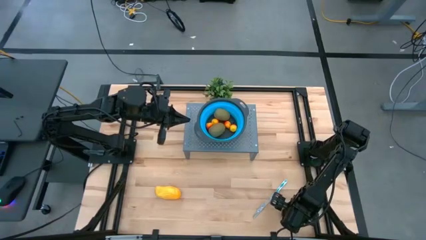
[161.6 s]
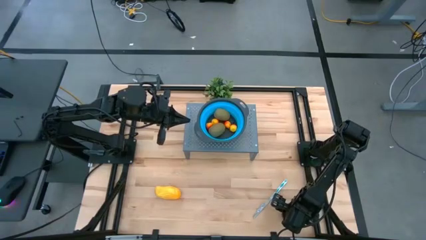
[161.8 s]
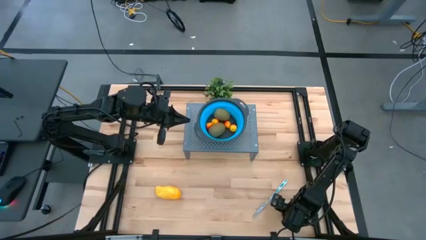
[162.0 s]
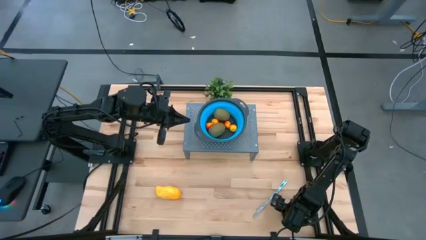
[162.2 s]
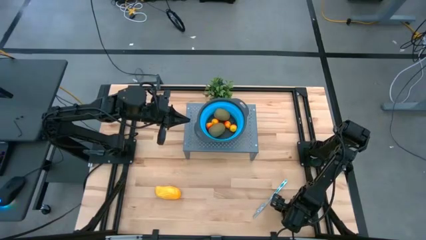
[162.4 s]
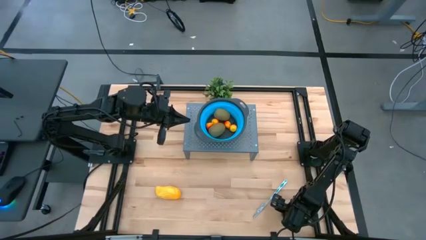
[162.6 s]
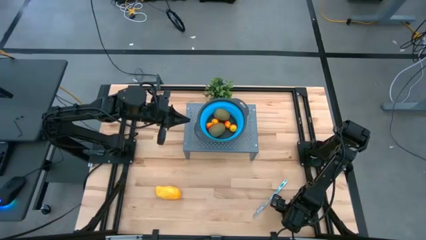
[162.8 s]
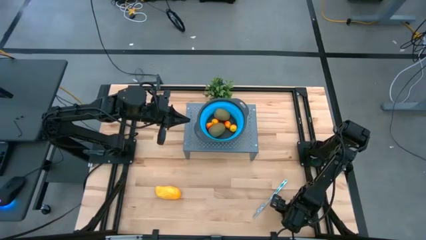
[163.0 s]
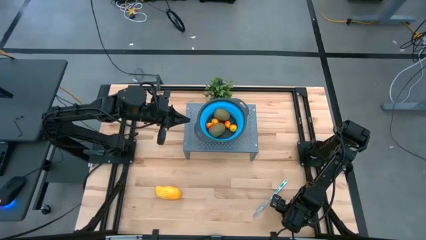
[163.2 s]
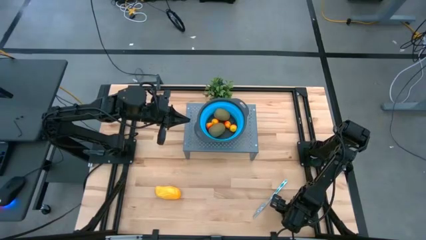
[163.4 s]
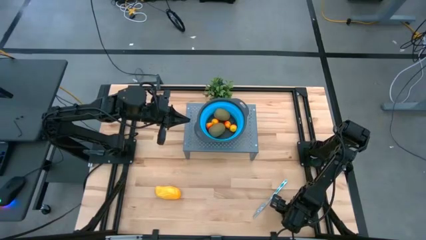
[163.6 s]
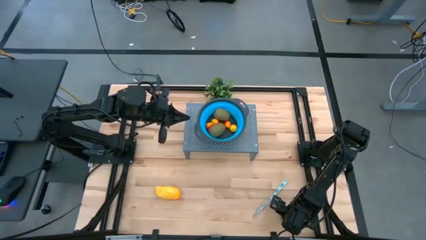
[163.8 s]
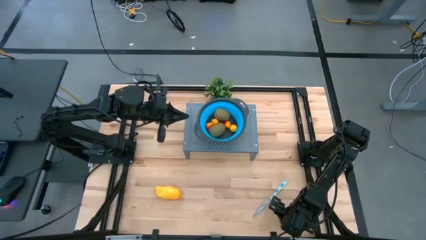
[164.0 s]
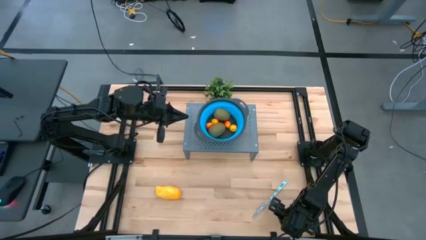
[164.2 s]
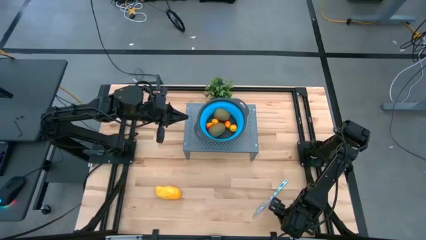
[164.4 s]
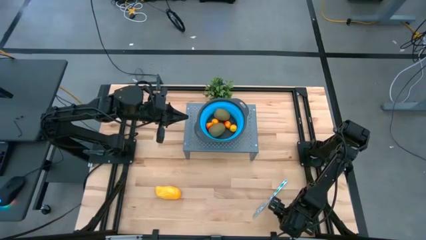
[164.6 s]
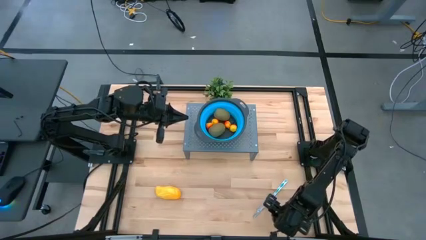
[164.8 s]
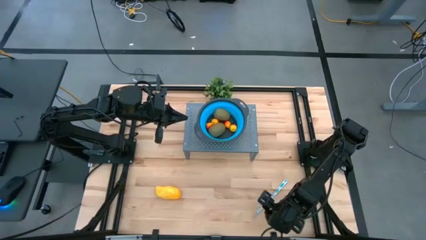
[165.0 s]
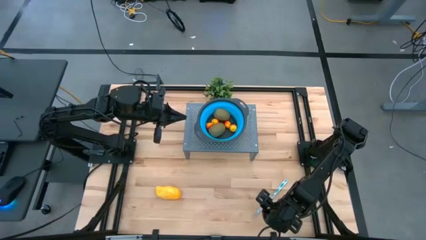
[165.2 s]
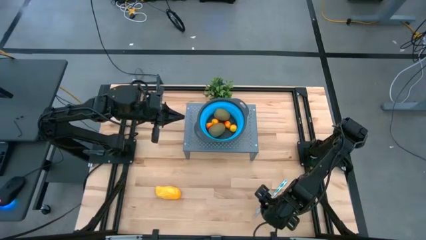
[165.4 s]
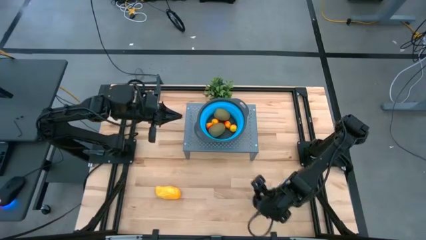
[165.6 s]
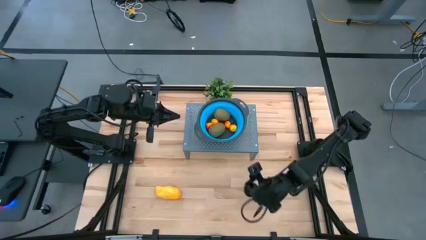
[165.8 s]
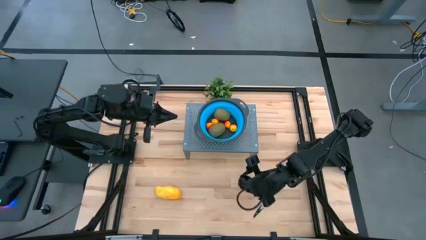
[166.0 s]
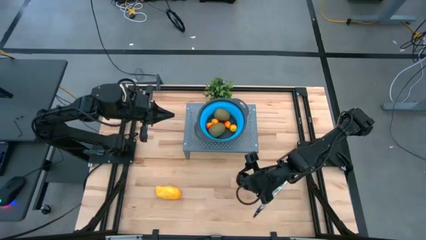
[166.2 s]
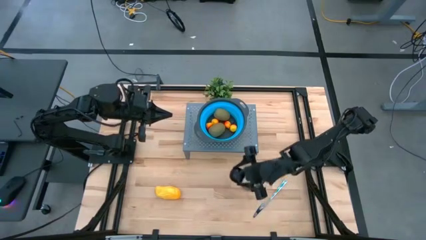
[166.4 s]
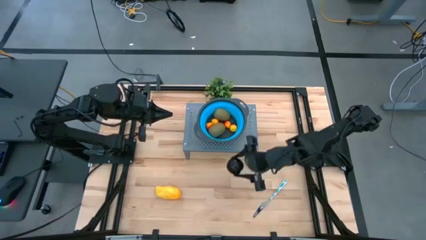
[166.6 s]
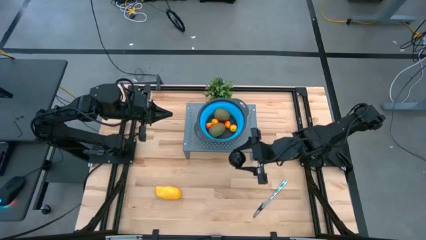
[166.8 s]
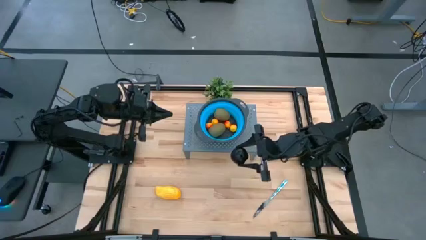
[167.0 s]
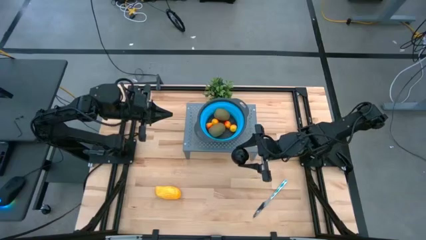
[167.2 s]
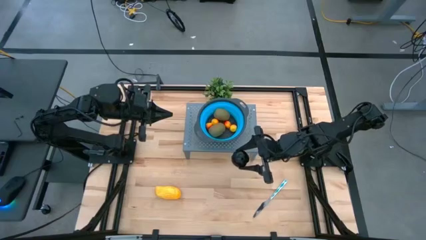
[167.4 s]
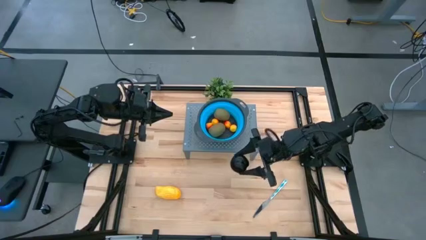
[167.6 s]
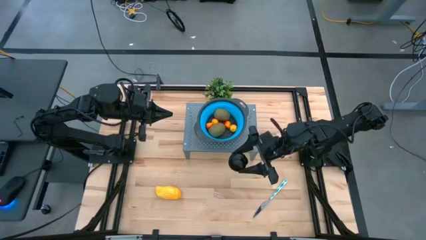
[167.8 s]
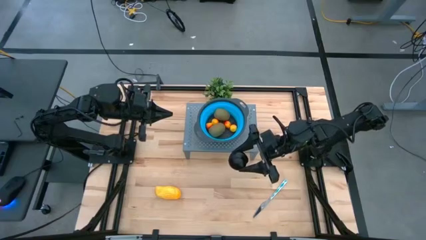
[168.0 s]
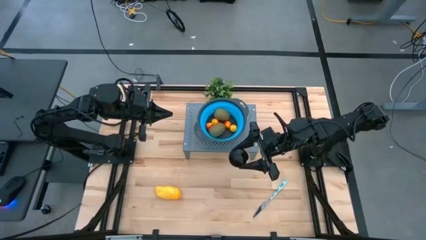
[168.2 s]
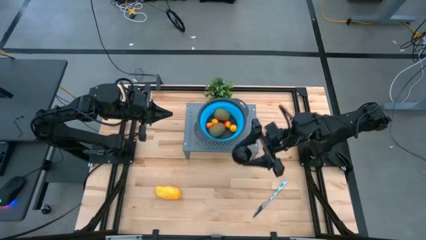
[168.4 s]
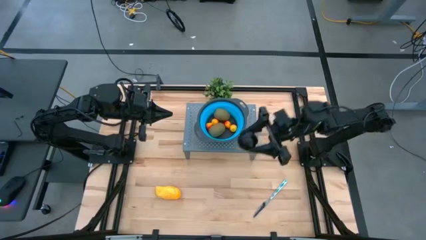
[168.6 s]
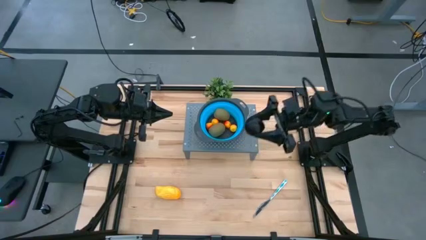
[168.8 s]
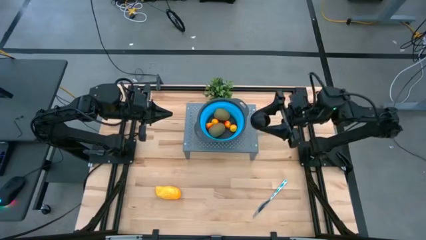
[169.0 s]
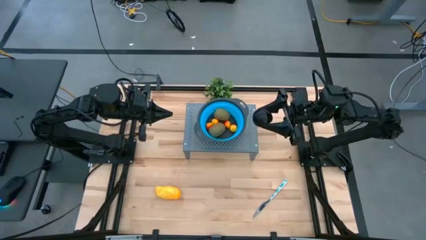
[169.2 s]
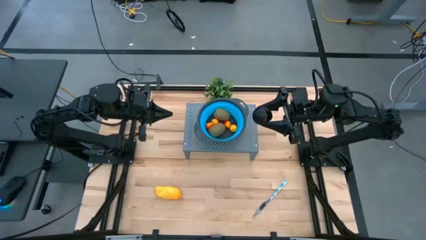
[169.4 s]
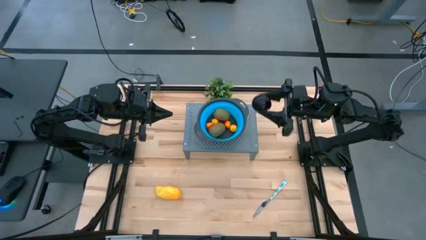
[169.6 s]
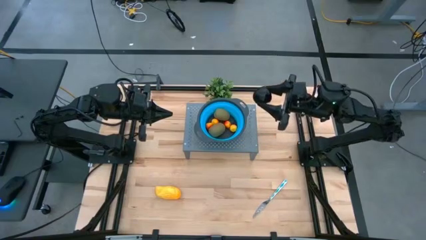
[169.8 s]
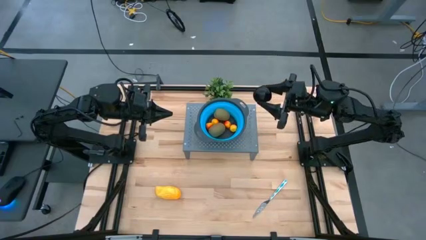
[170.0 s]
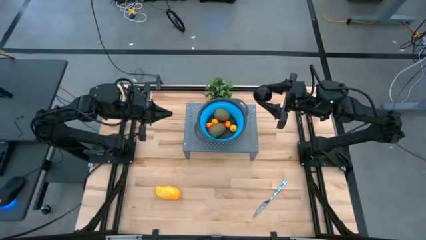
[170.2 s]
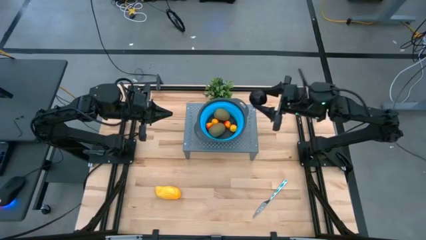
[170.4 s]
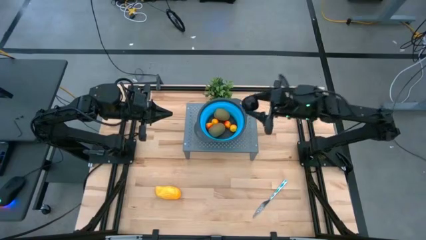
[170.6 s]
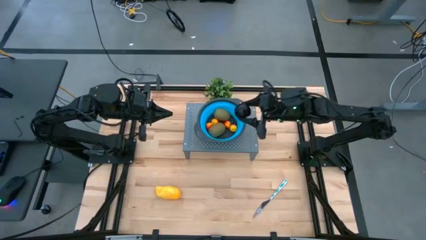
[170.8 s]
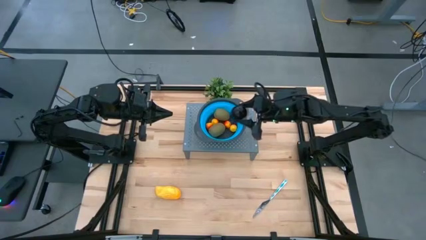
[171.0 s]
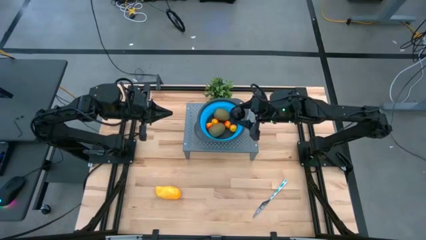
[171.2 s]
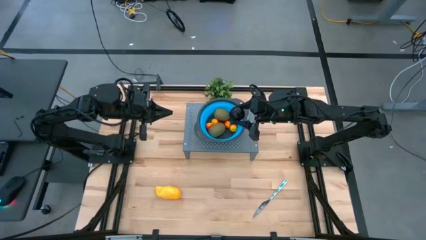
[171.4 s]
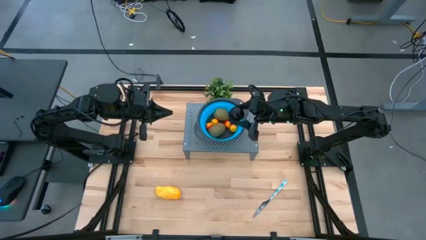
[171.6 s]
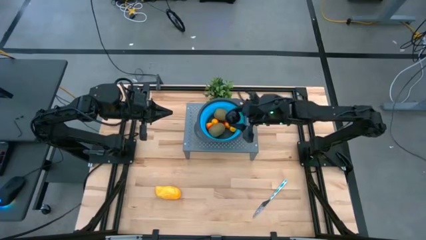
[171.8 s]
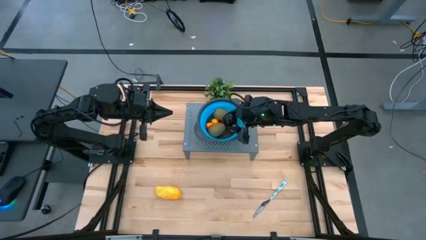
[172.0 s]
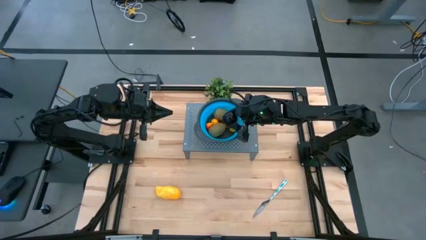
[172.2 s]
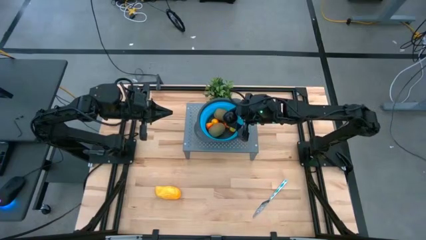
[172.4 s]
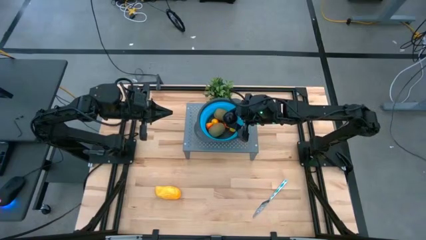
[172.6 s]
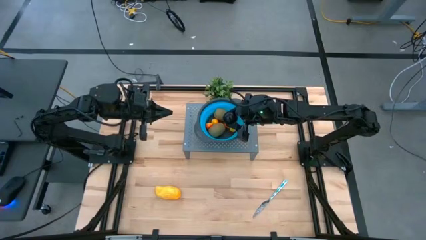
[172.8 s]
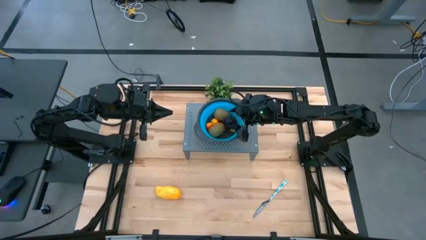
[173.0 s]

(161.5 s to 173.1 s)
Task: Pick & Place Fruit
Put the plum into the strainer bowl on the shelf

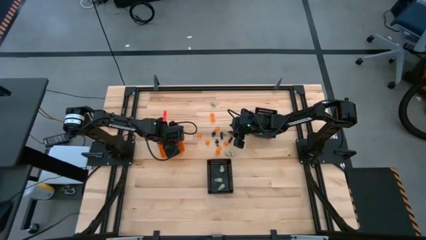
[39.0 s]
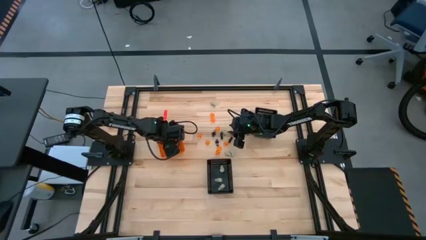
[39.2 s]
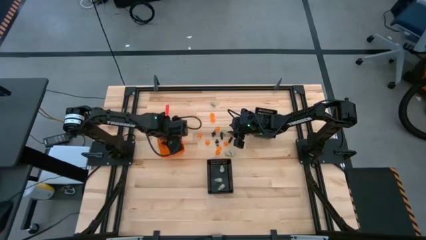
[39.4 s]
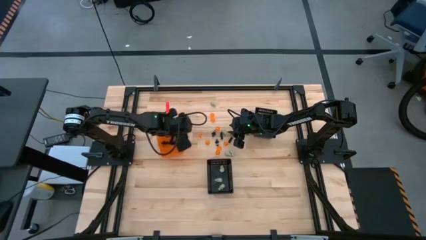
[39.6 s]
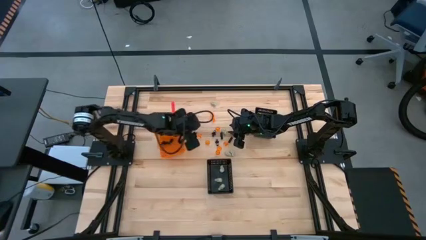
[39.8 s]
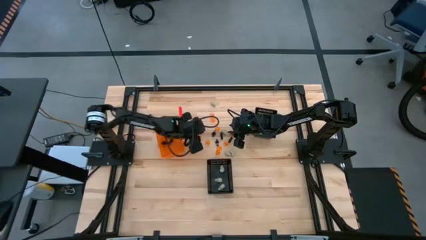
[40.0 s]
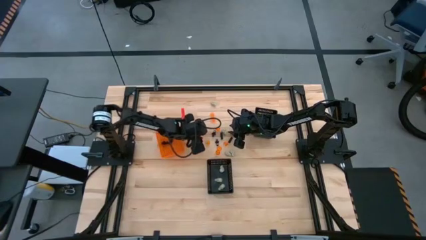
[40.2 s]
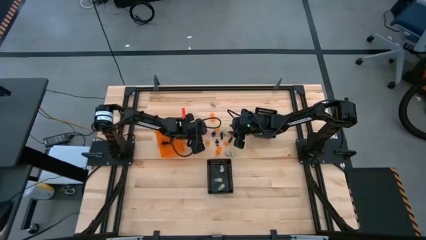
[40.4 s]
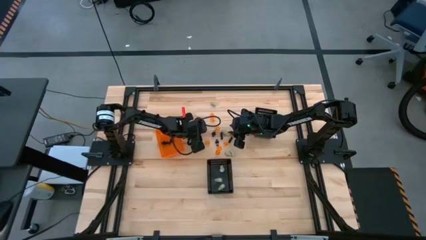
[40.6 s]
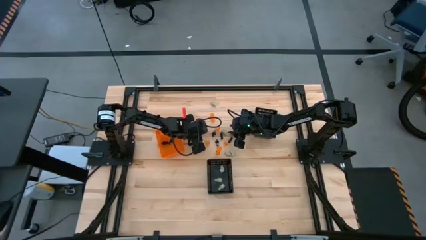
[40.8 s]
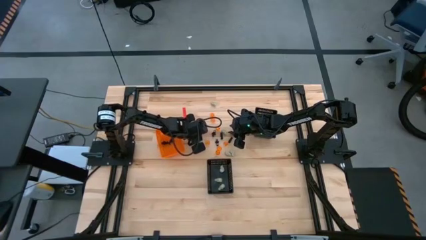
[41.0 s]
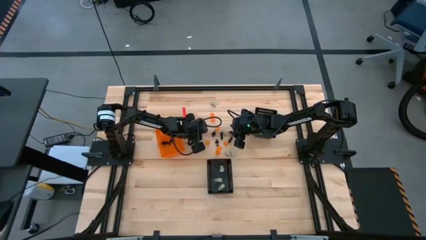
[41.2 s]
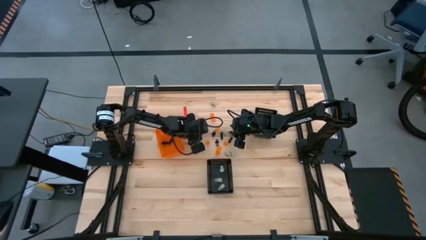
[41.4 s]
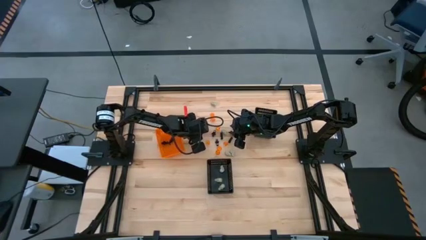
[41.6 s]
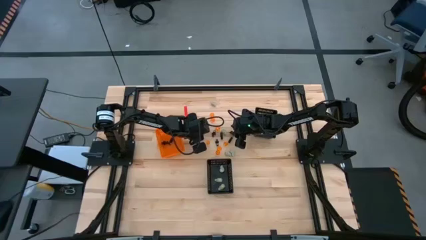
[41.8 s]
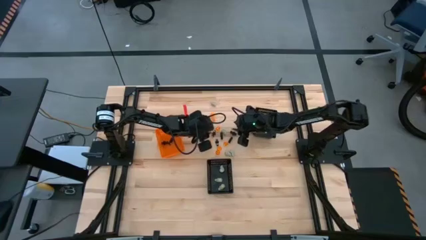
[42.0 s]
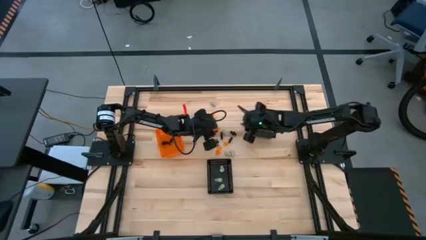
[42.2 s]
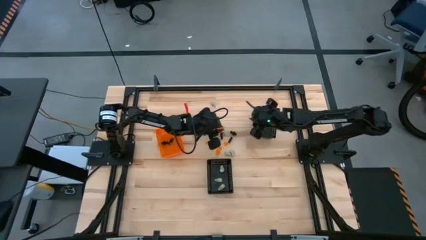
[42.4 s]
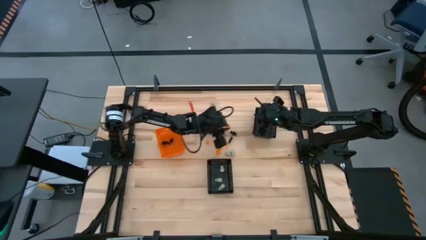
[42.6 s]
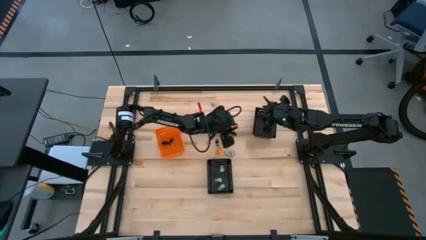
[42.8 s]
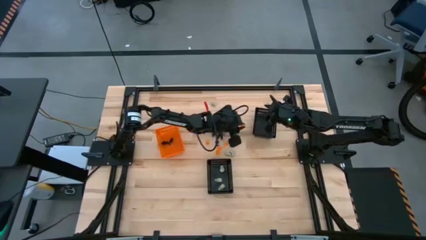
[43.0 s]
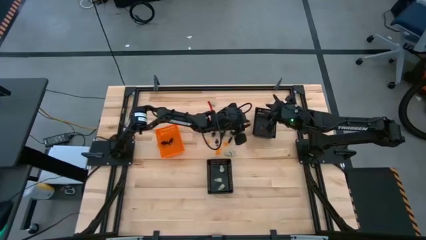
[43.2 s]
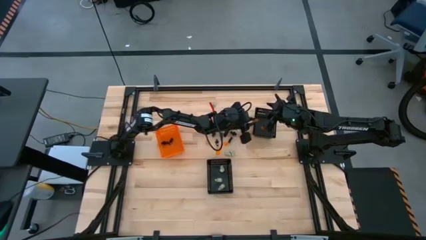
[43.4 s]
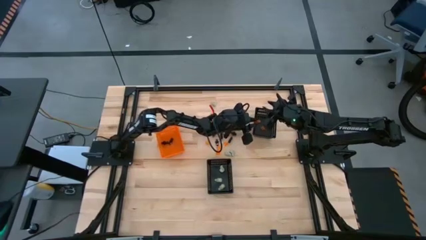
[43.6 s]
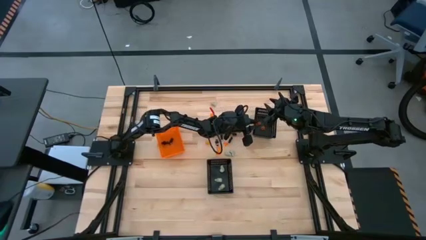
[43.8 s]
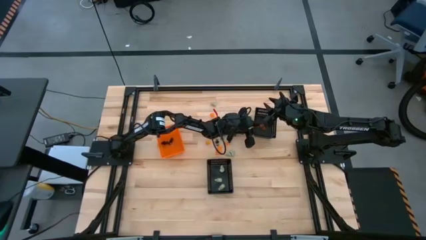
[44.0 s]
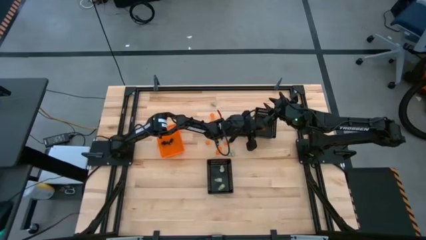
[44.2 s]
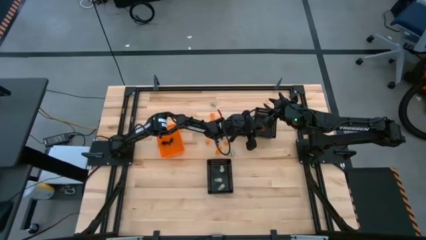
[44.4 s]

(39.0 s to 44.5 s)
Task: Sort Halloween decoration
Put the orange pumpkin toy into the top black bin
